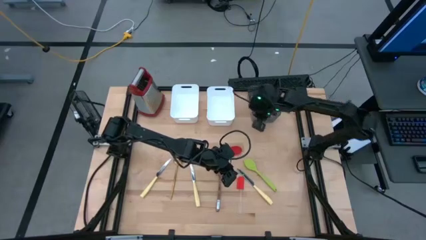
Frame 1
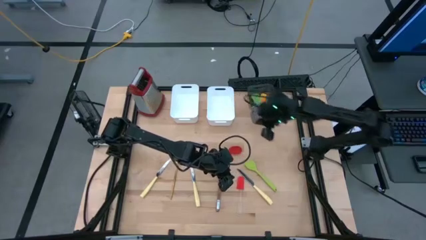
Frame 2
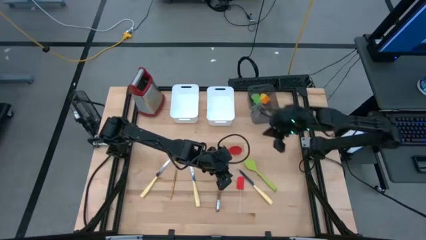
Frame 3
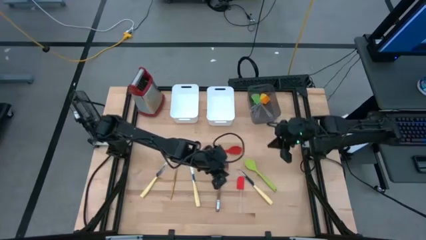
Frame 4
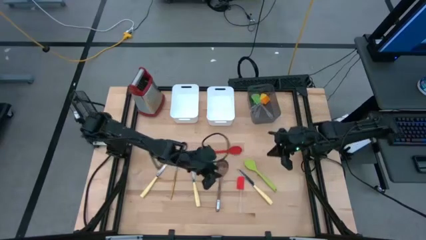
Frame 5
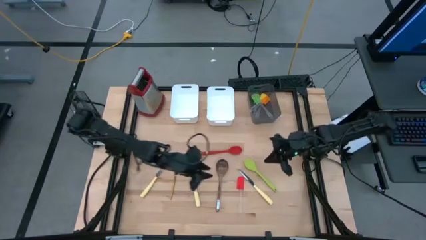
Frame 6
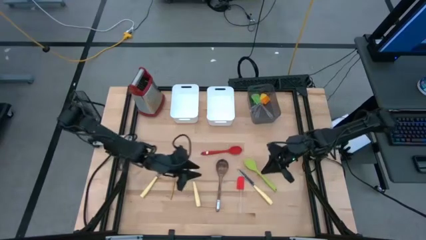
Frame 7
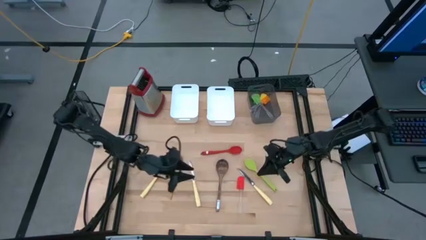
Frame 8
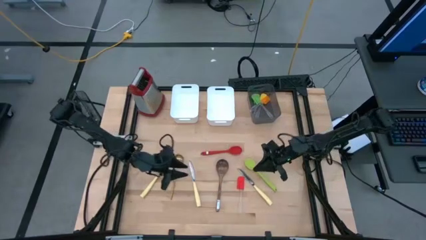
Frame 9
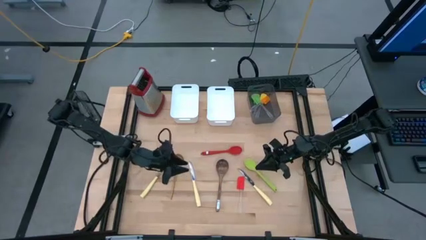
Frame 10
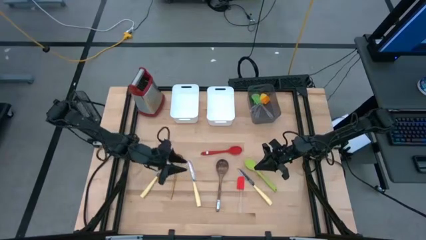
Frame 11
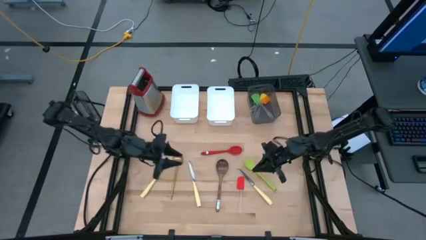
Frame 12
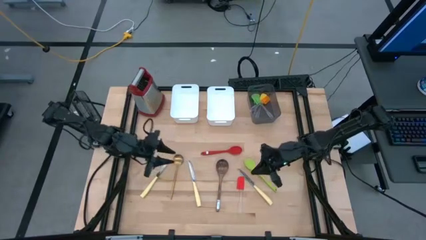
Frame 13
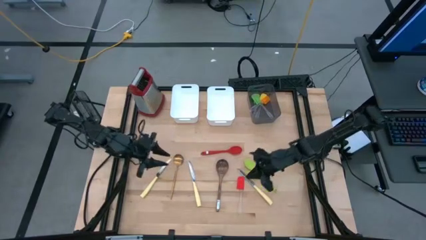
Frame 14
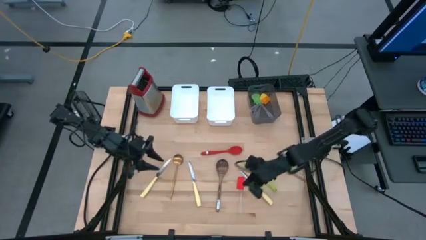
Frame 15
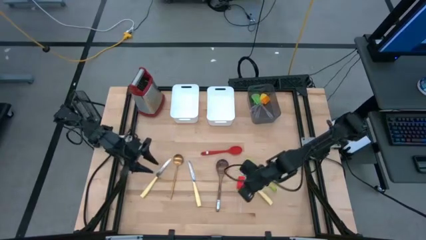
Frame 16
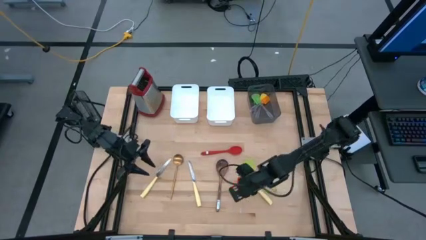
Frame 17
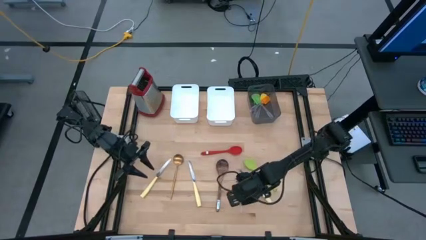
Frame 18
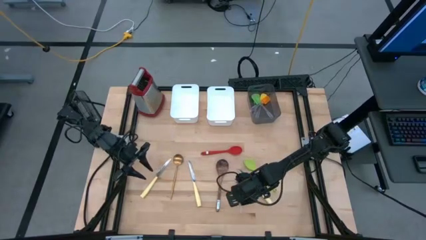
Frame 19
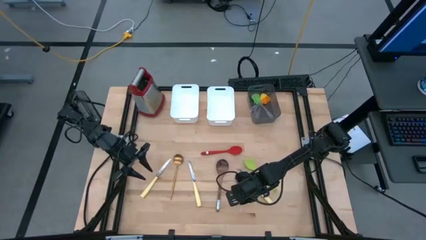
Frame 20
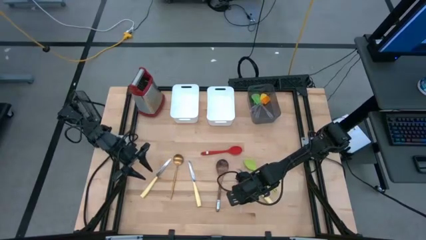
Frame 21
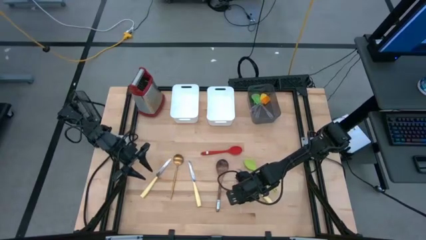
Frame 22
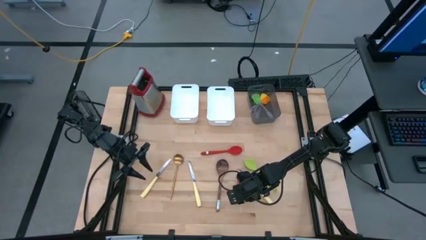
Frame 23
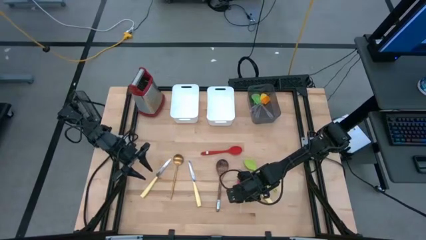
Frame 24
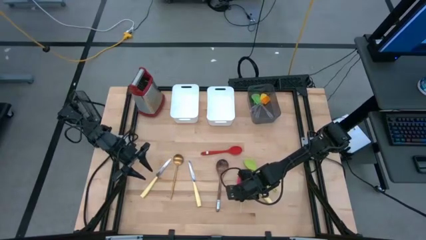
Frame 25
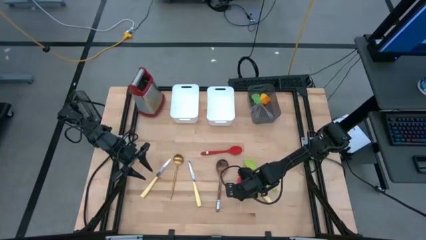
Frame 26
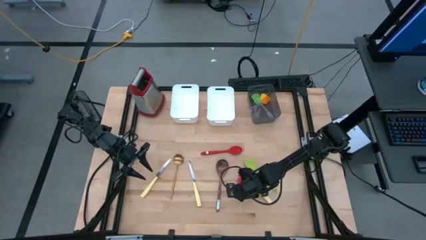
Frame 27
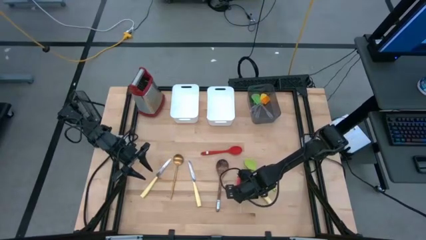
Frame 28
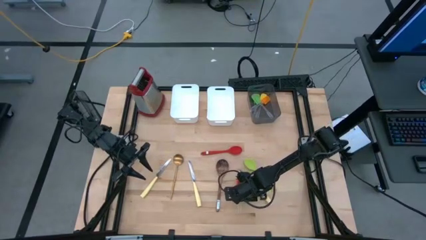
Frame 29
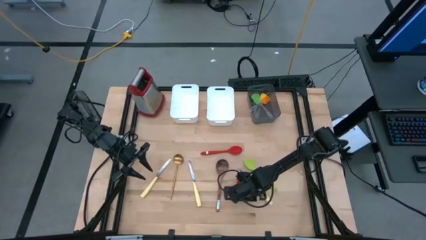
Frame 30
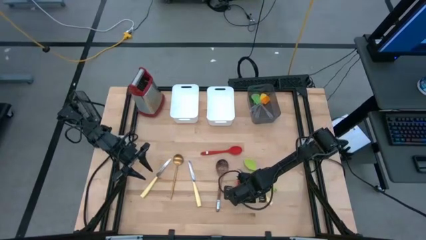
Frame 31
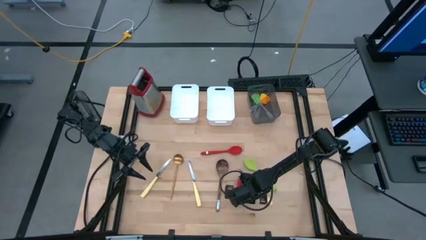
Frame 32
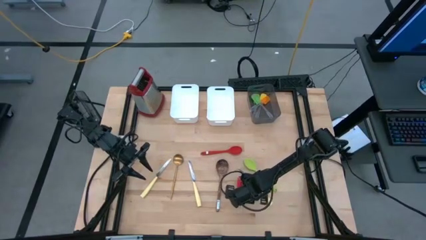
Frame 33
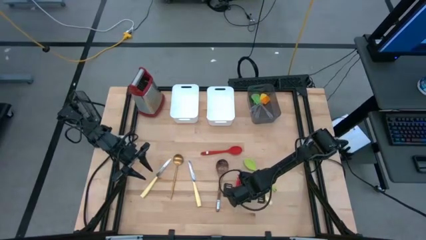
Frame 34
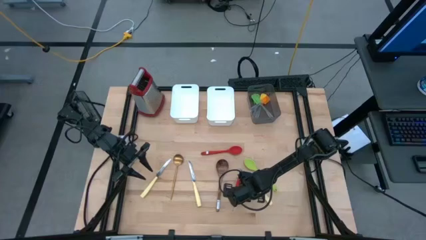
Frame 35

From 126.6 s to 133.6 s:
Task: Pick & Place Kitchen Items
Put the red silicone spatula into the black bin

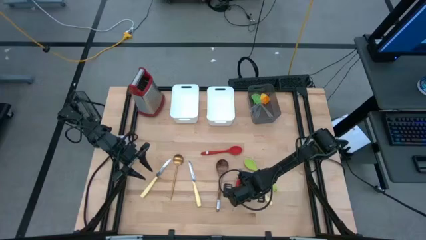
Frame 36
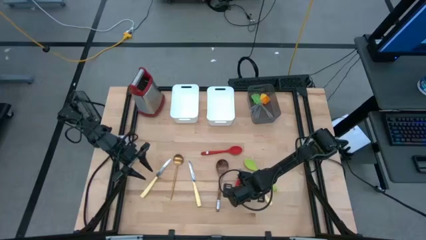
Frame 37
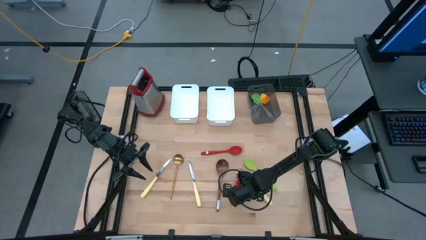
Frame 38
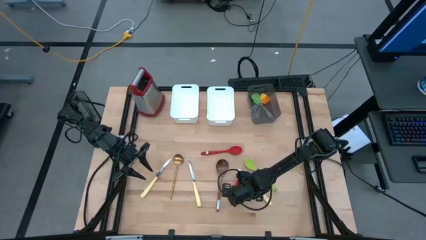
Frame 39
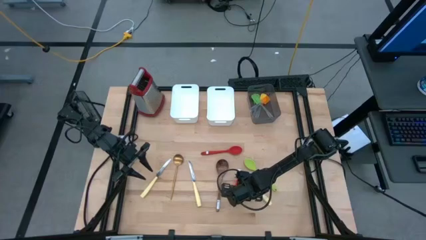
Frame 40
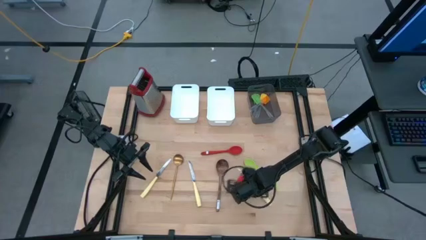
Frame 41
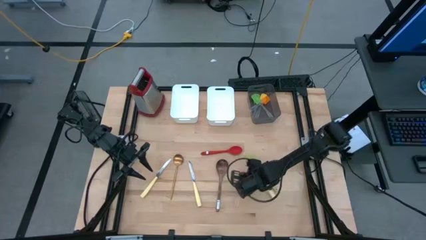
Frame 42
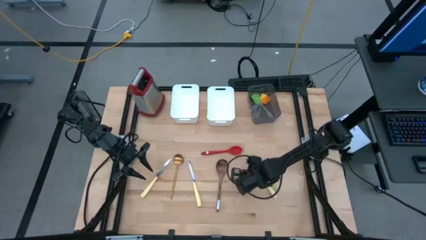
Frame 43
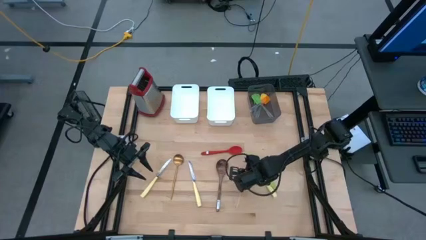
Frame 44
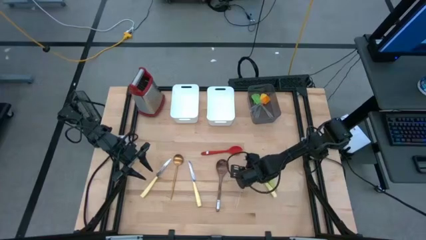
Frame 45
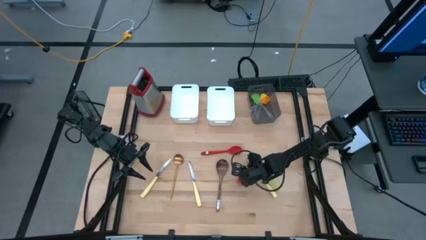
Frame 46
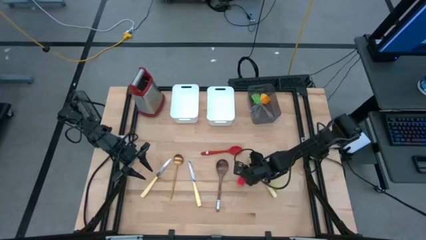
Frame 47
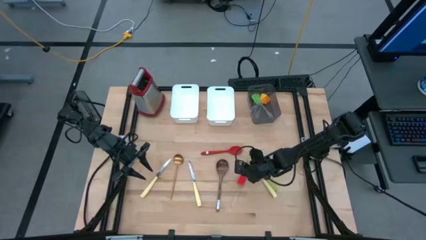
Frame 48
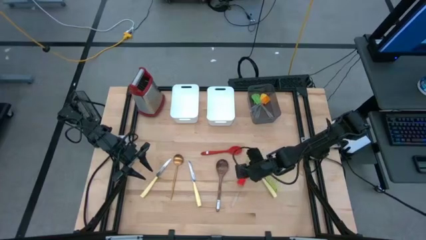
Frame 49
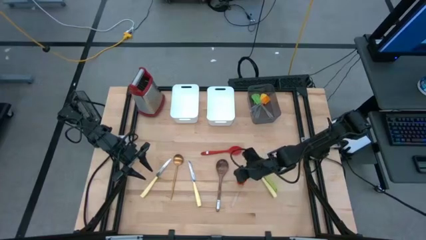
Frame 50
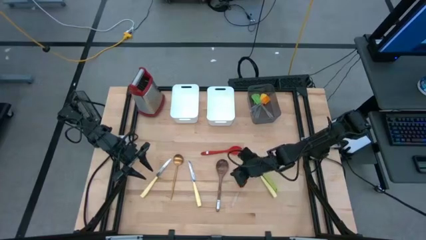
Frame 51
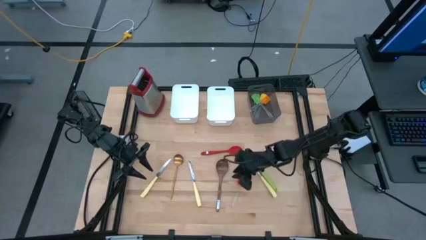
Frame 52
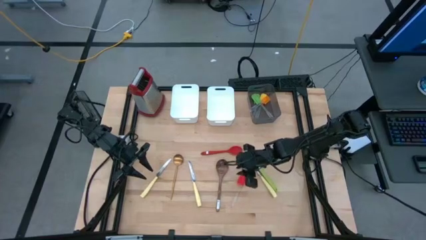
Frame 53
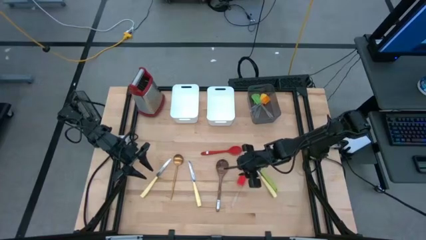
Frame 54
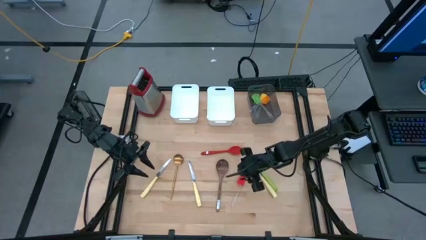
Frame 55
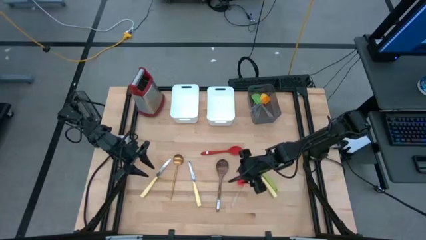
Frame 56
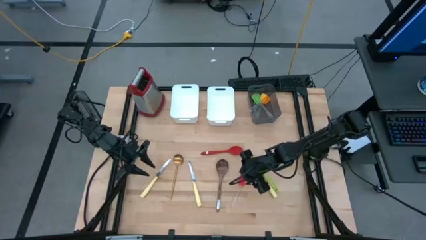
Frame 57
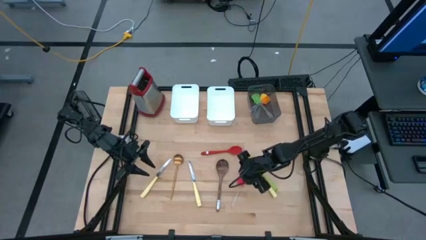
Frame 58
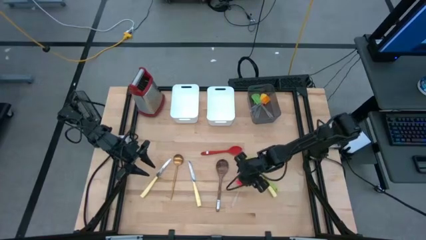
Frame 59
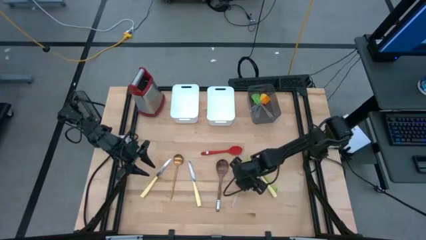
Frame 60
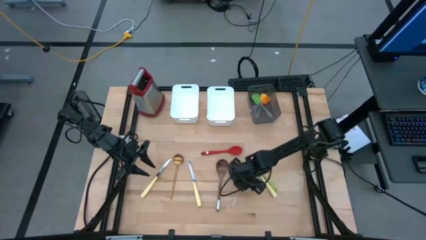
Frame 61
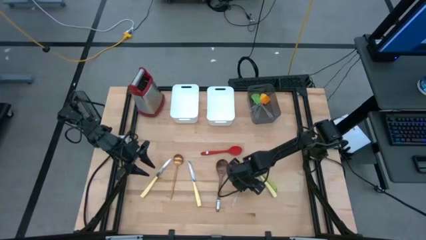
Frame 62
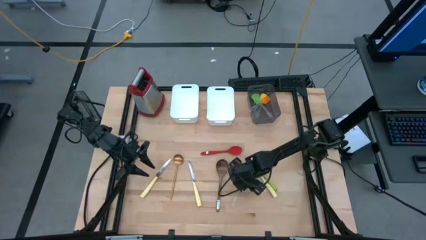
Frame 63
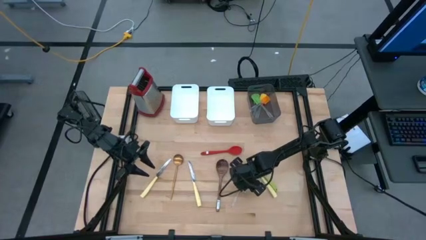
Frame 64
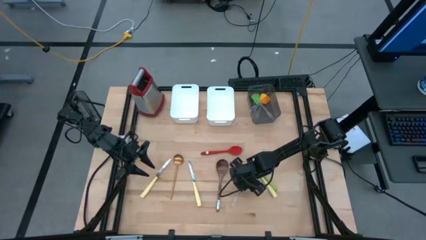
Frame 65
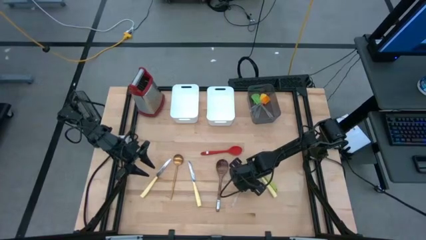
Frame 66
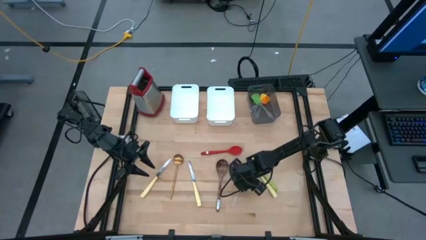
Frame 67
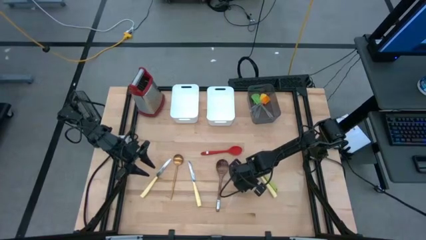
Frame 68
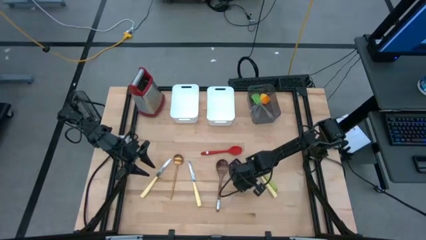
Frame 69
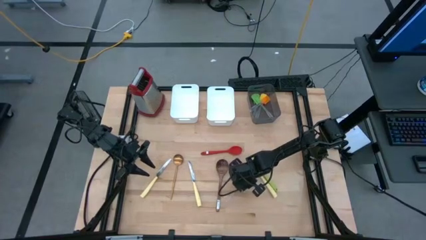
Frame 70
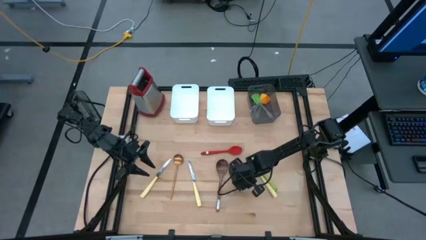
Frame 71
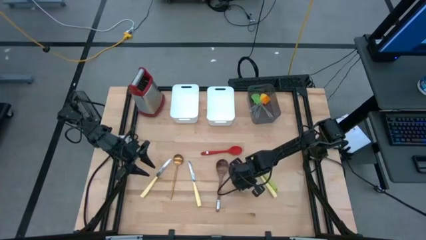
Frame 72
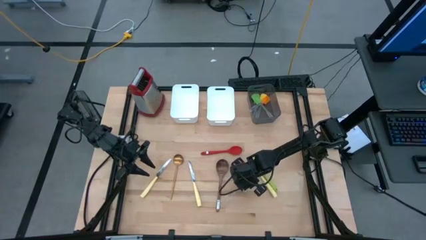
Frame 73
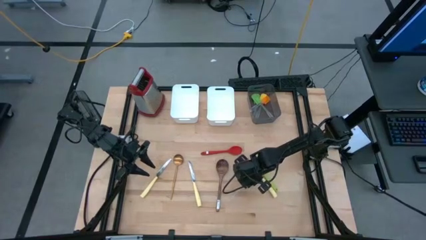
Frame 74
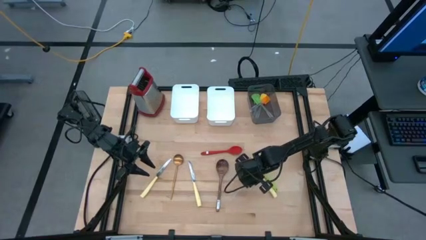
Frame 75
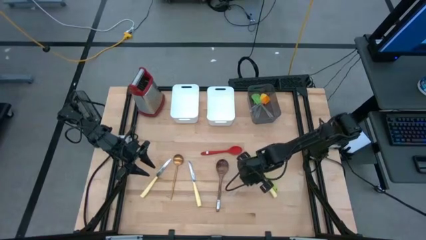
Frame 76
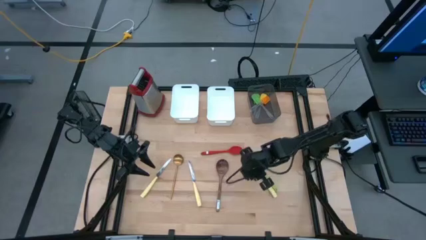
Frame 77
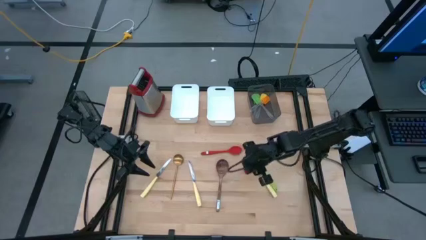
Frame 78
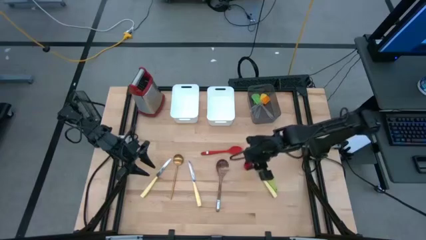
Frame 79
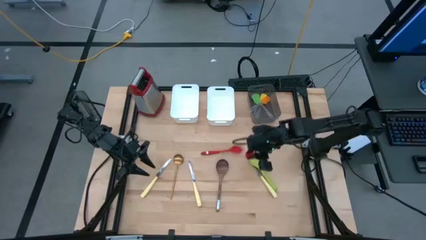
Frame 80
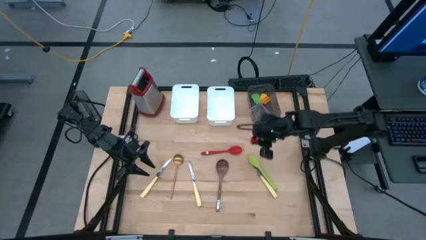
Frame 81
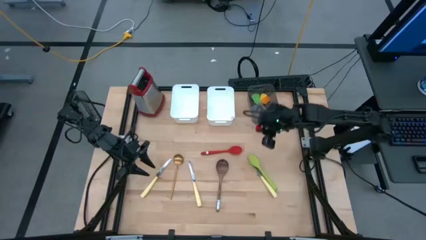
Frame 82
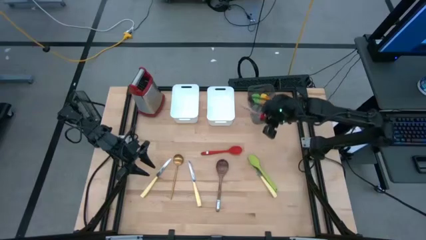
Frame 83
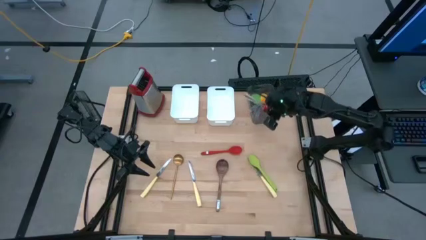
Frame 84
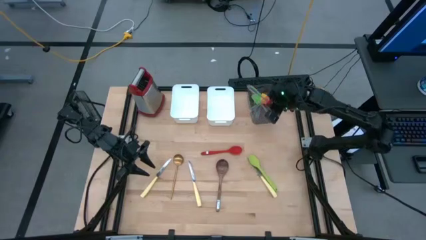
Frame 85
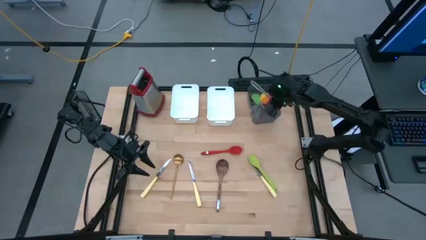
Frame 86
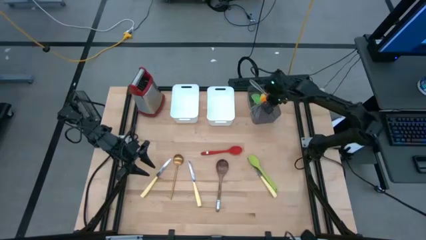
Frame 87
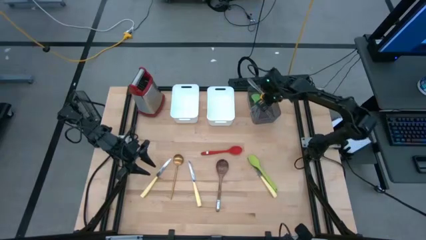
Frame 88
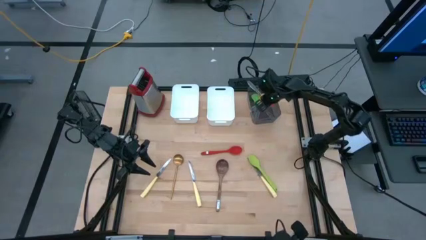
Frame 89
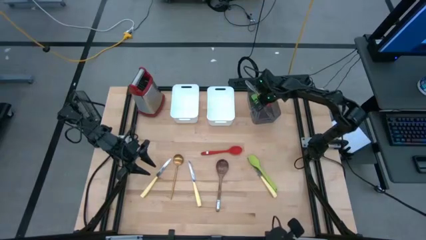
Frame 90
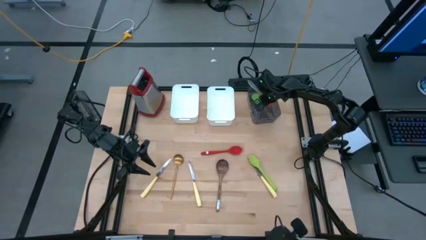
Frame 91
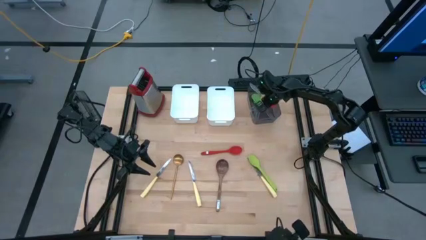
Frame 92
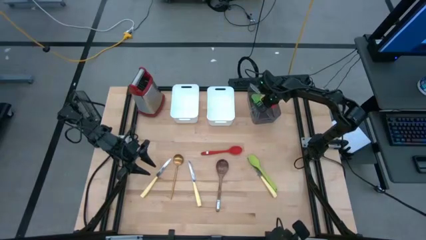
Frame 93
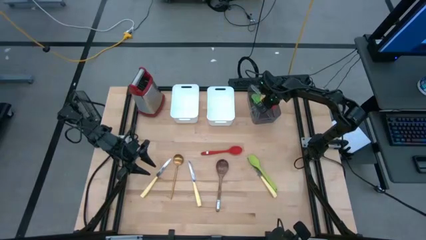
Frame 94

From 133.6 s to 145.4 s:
Put the red silicone spatula into the black bin
